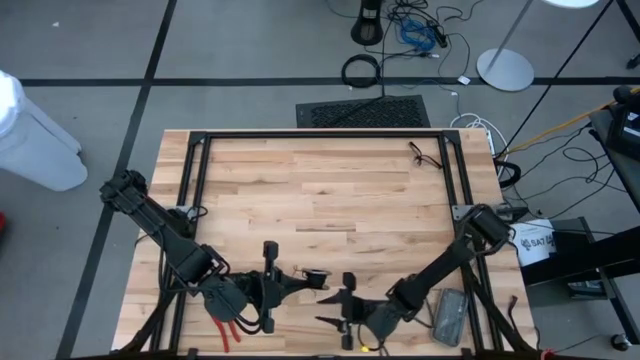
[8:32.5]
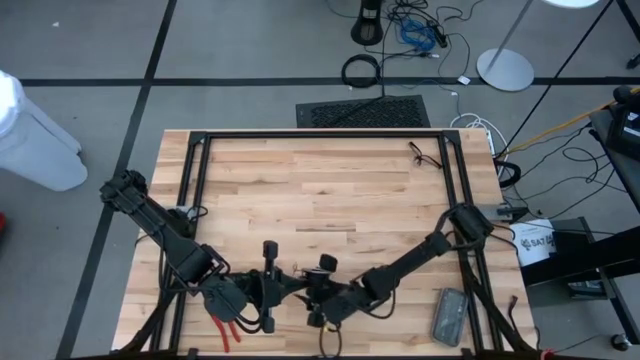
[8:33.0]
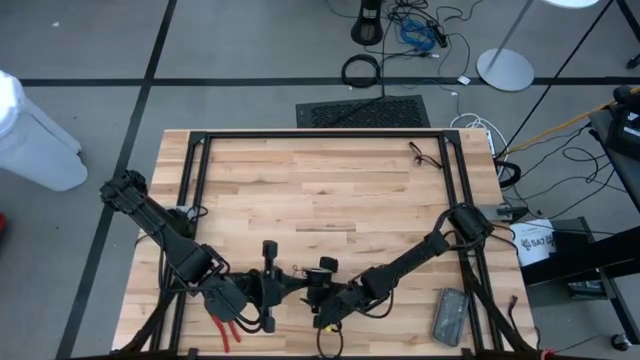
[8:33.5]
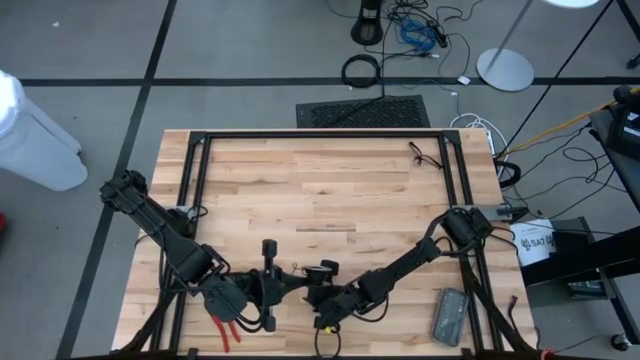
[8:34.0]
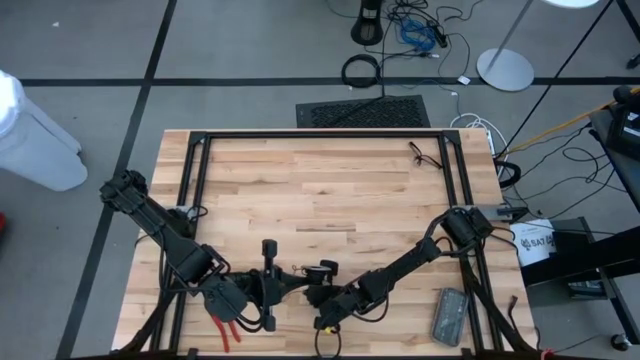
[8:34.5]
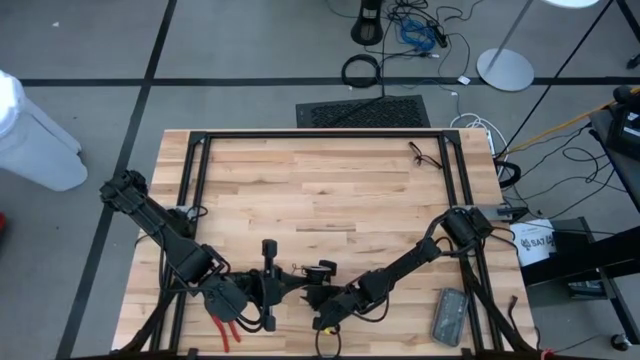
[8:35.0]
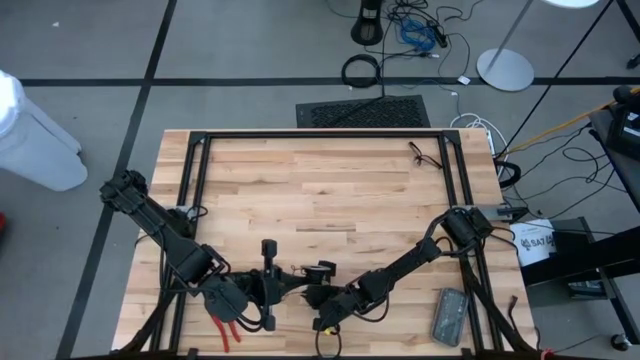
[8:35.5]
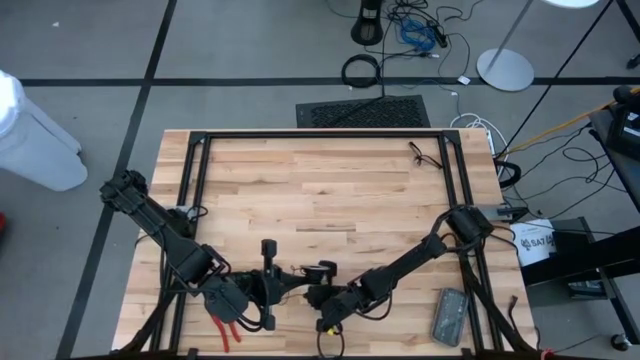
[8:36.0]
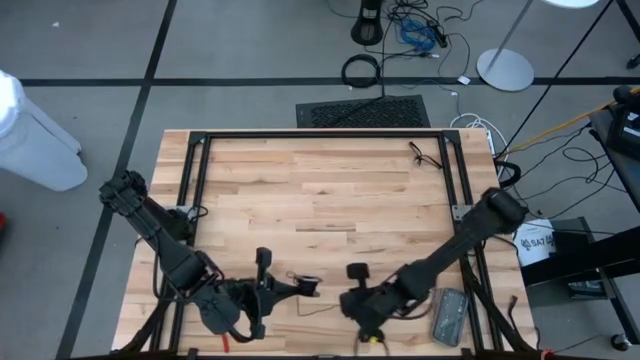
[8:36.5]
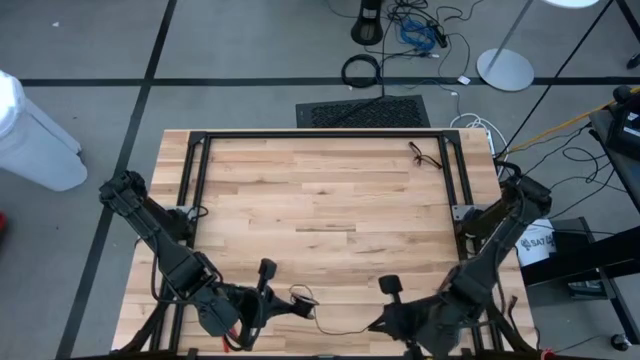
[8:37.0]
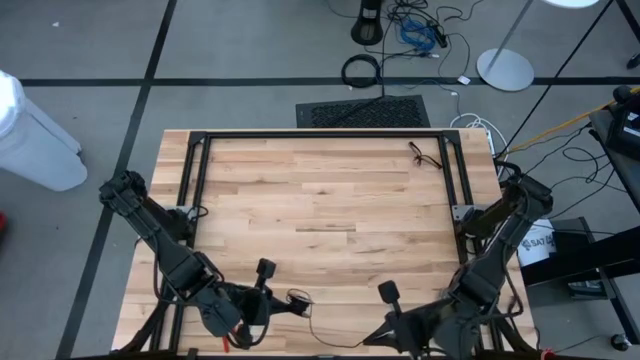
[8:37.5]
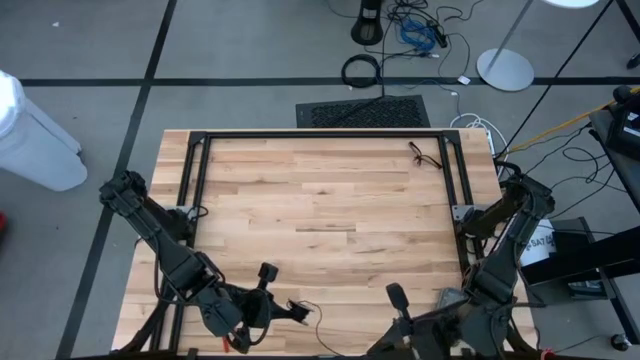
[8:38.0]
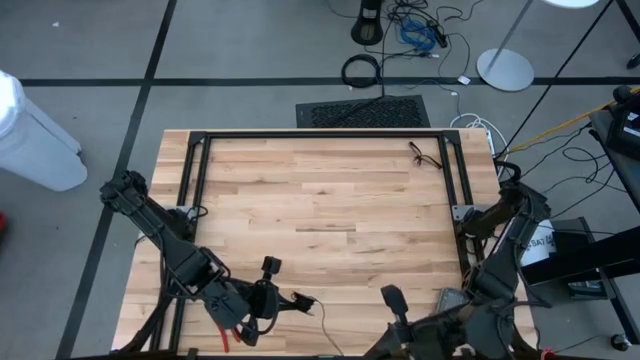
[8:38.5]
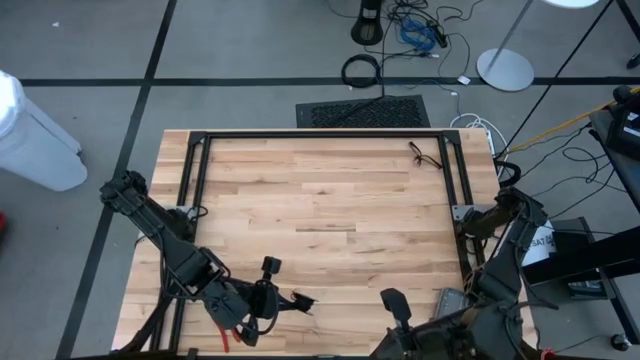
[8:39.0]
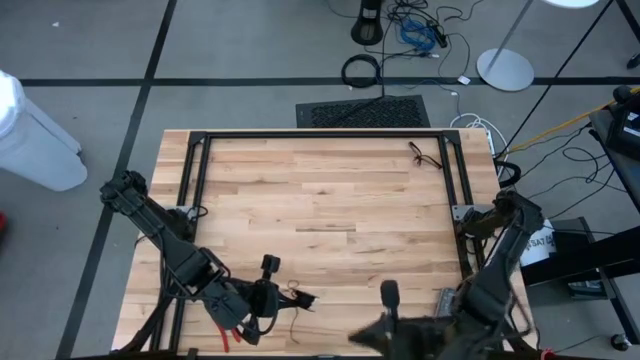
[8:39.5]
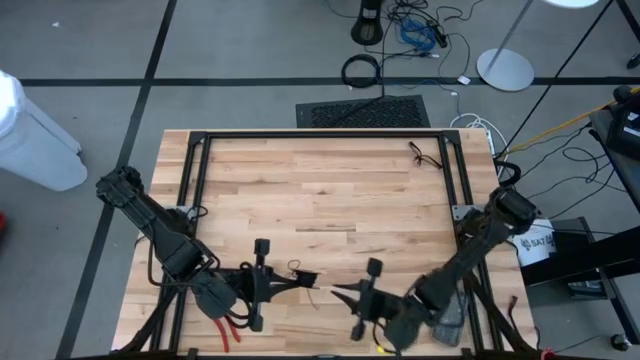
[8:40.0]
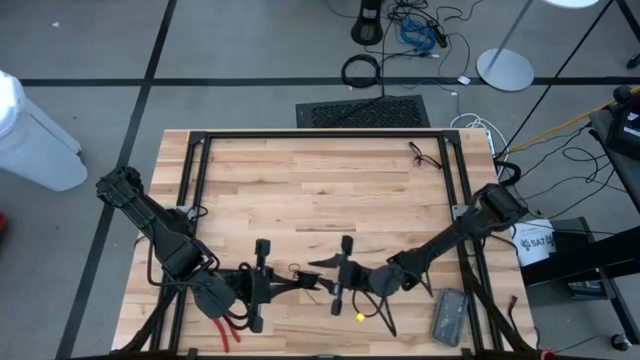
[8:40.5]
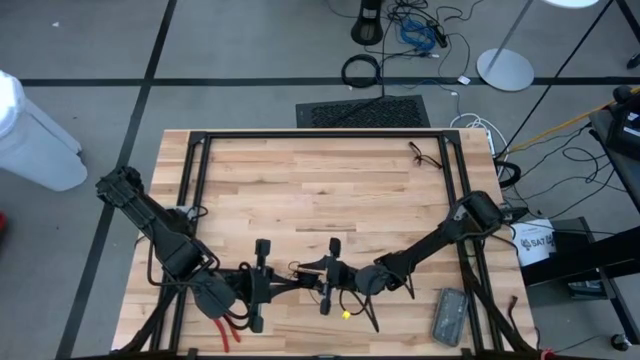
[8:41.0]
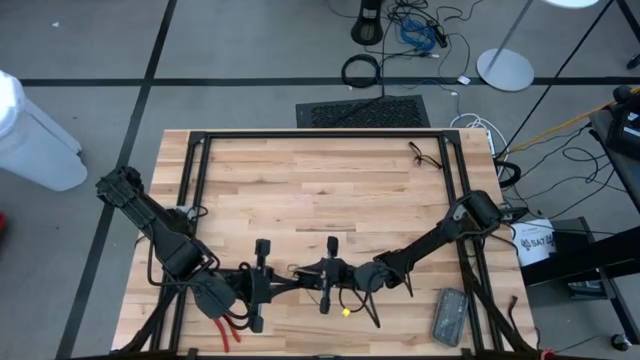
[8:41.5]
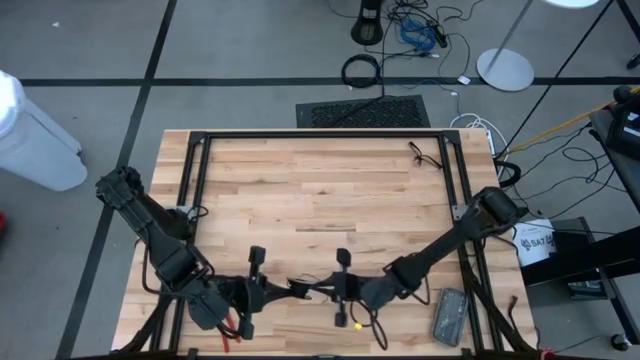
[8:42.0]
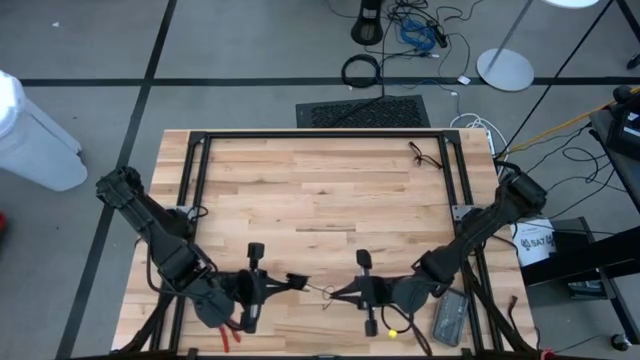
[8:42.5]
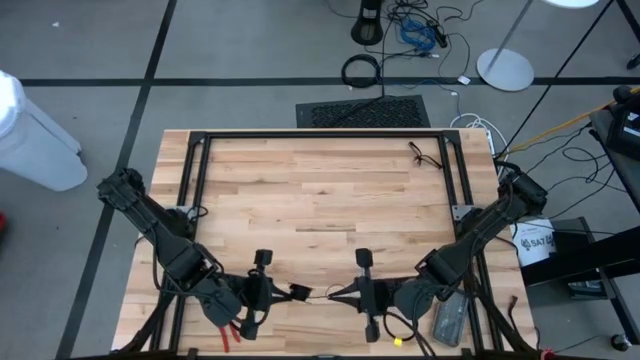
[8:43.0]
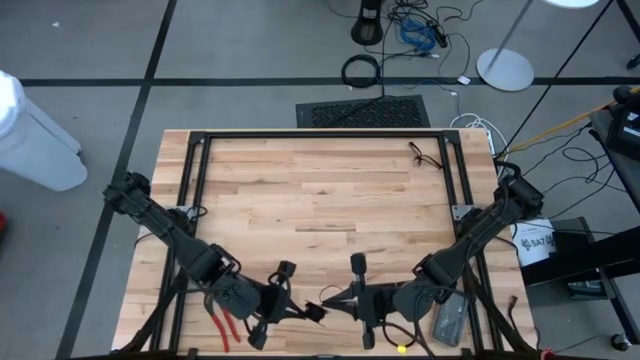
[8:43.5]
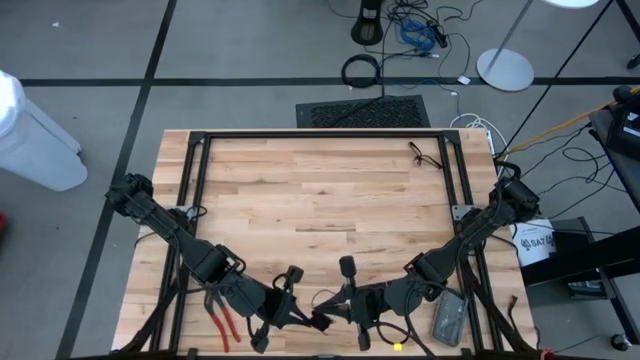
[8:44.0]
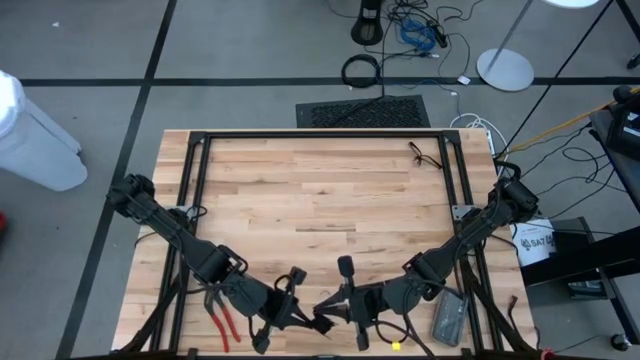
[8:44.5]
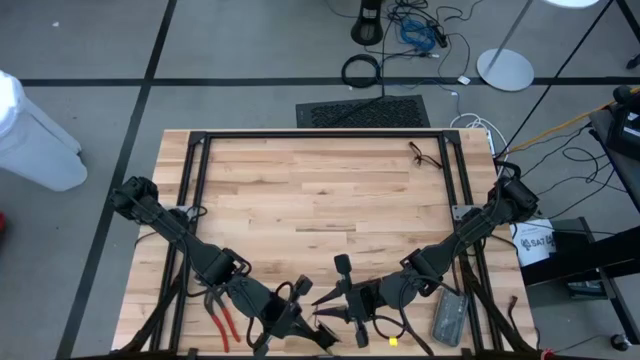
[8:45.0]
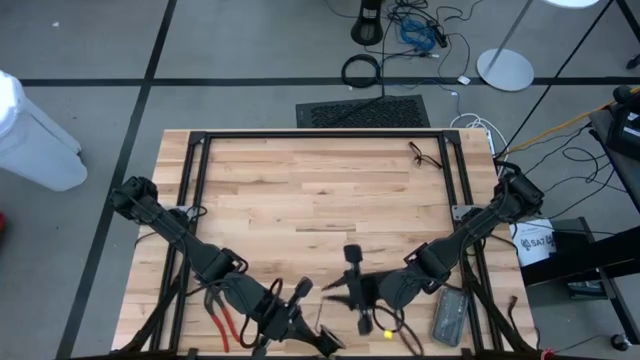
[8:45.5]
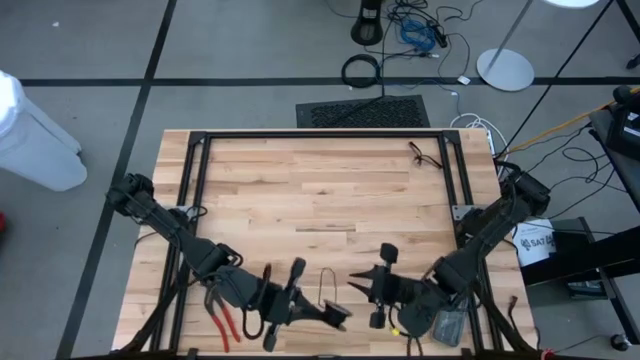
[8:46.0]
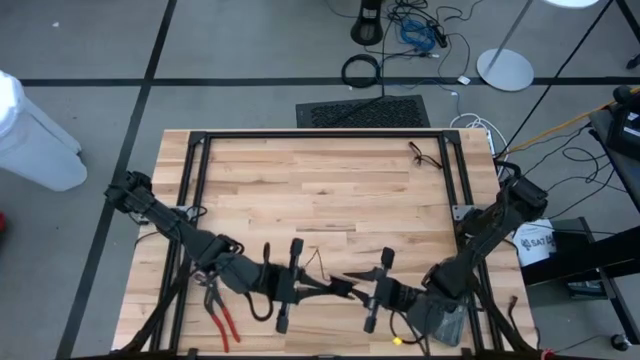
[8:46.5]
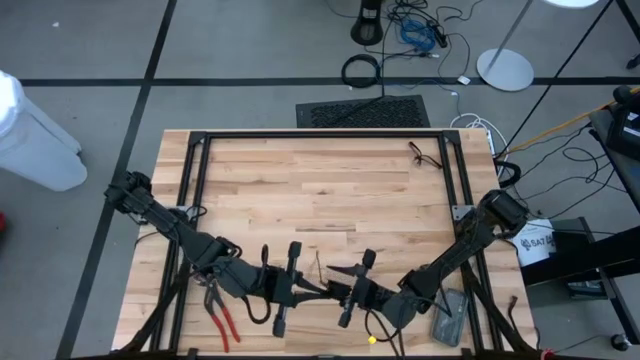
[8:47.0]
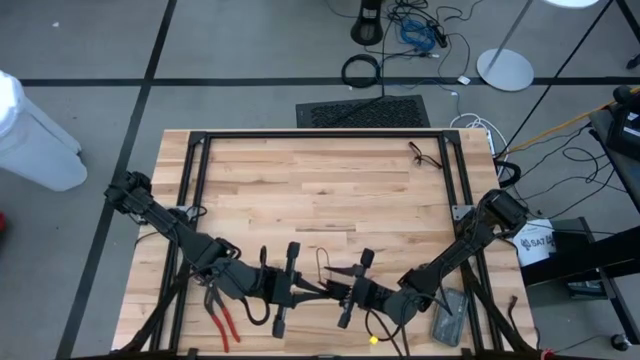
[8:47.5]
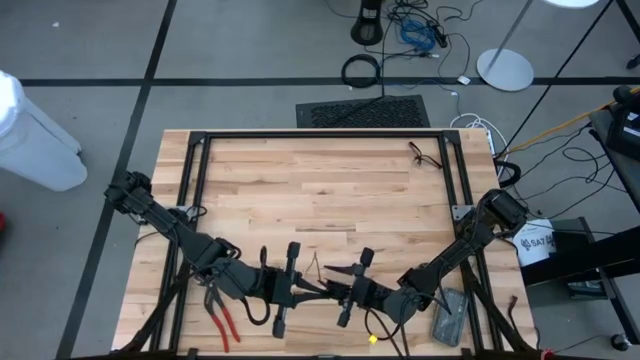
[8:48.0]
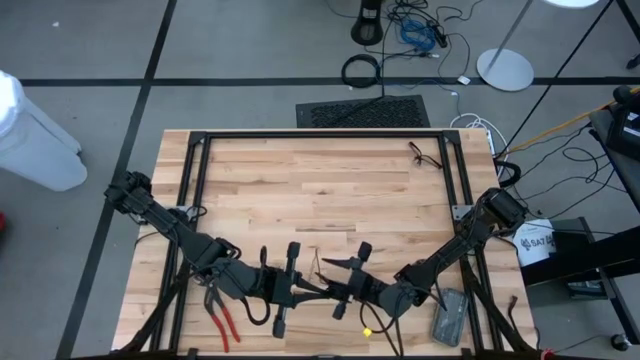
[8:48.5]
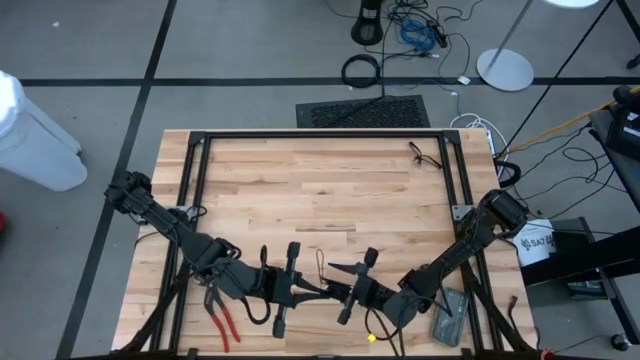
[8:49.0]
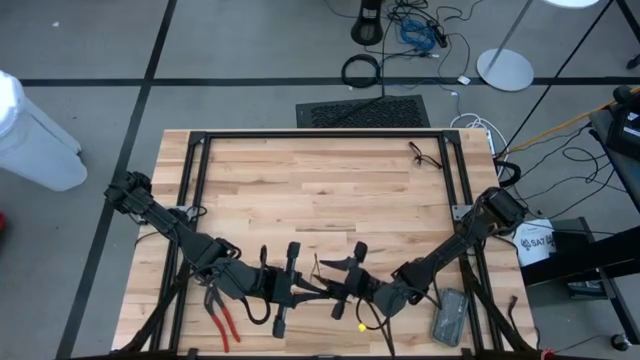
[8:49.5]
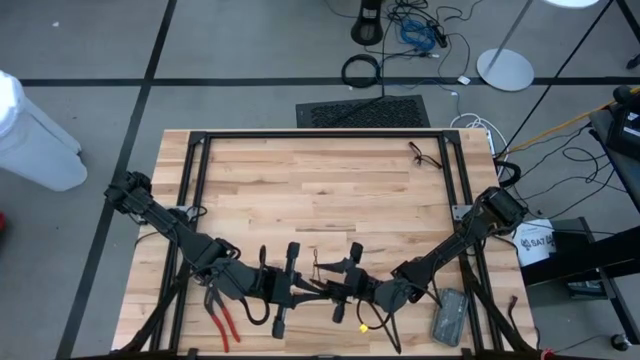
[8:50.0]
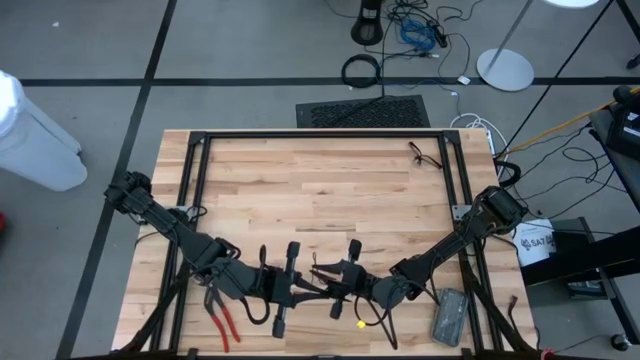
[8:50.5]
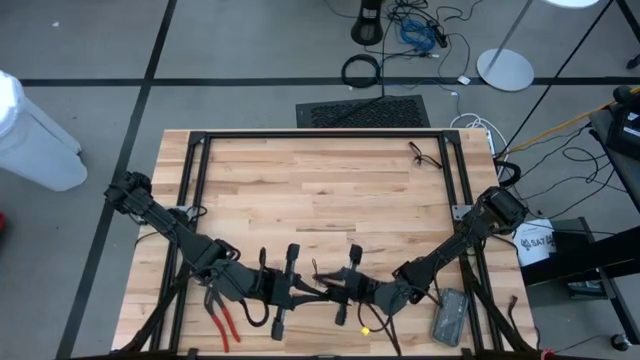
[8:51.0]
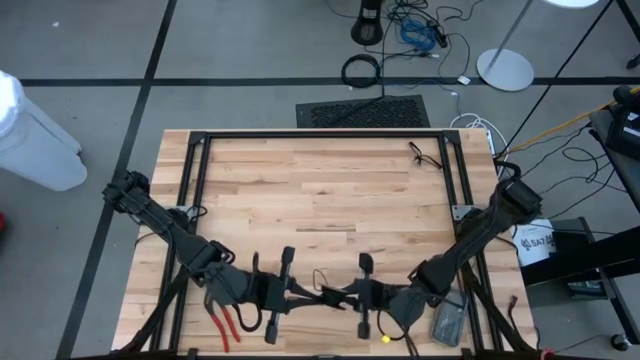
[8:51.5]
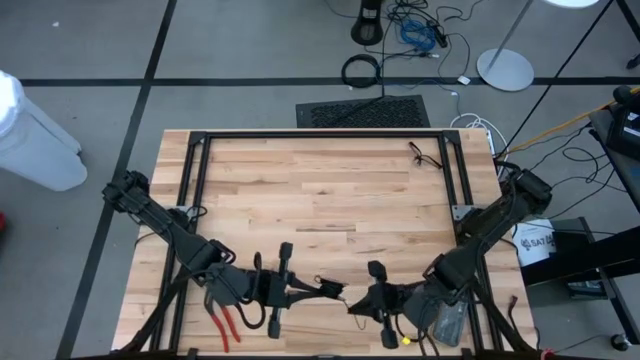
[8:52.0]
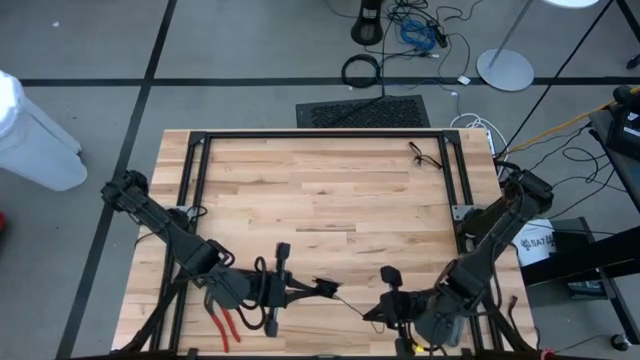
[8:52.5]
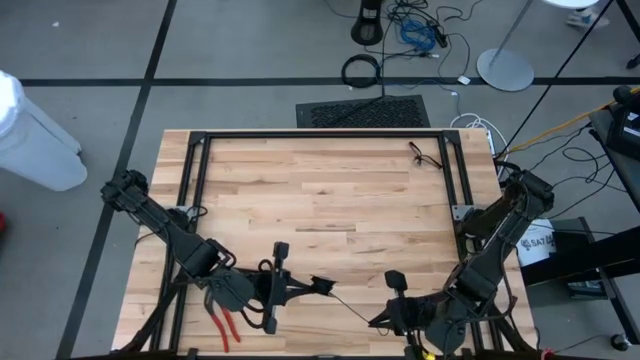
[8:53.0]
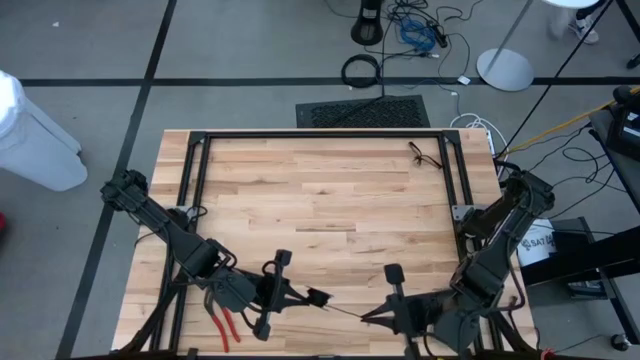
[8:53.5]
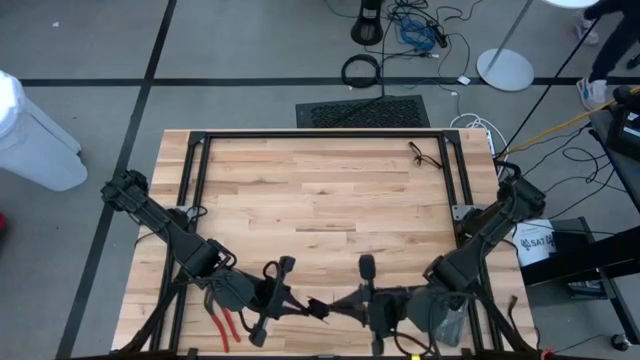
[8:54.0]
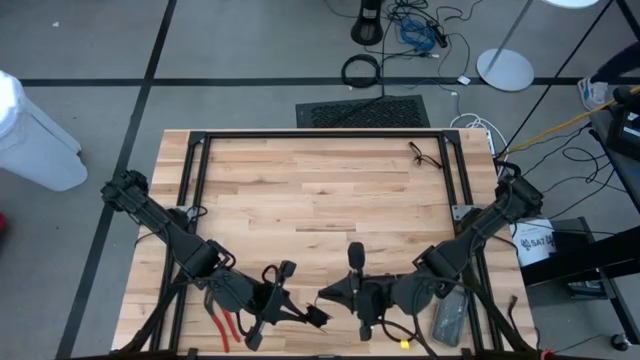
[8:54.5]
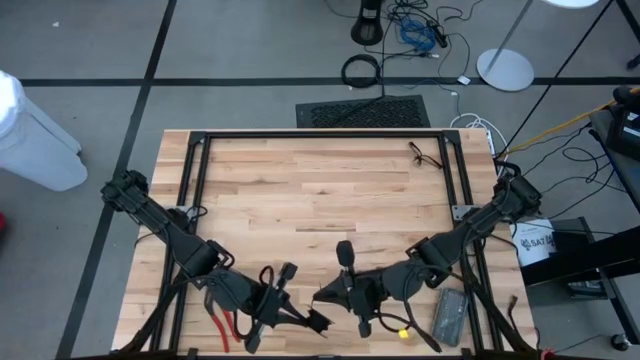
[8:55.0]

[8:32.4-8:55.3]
Task: Coil cords
Coil the black wire onto the black spool
